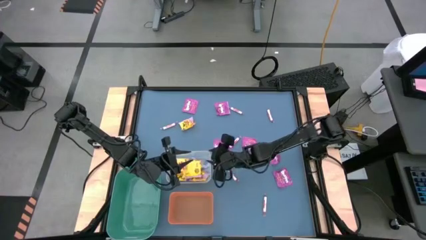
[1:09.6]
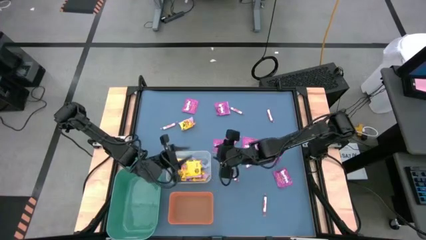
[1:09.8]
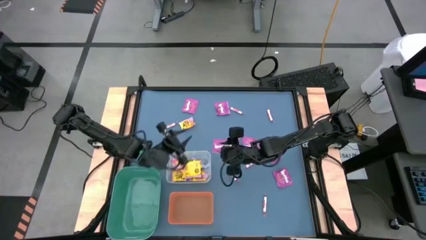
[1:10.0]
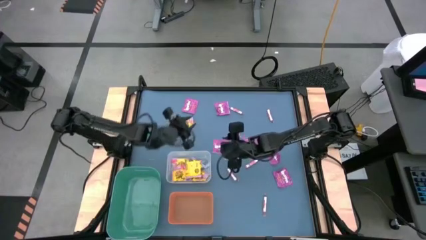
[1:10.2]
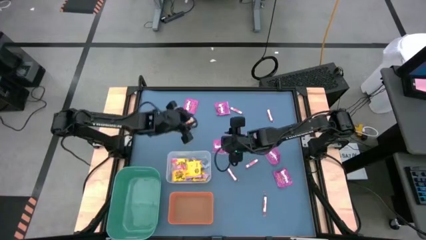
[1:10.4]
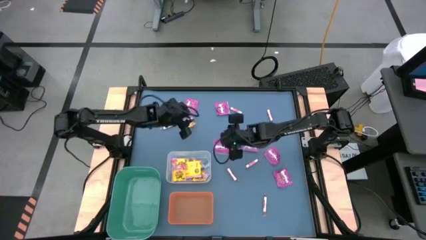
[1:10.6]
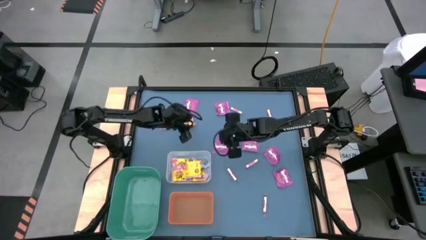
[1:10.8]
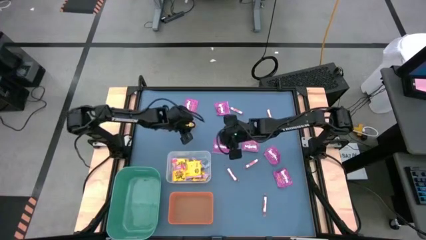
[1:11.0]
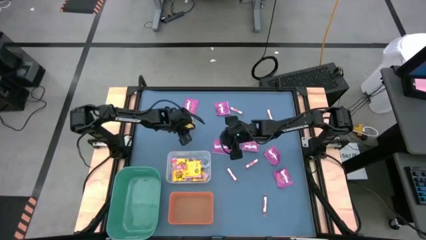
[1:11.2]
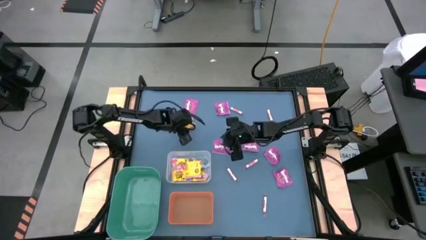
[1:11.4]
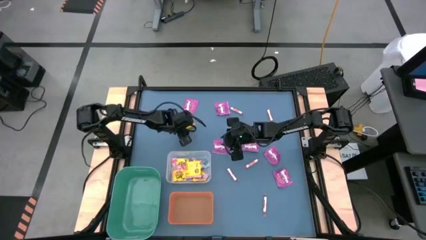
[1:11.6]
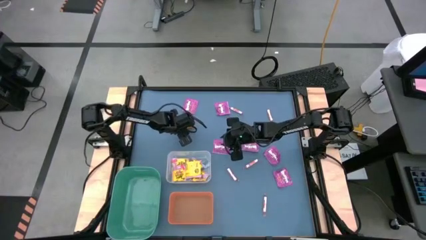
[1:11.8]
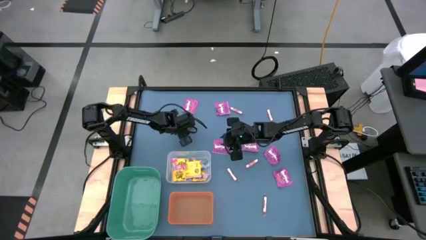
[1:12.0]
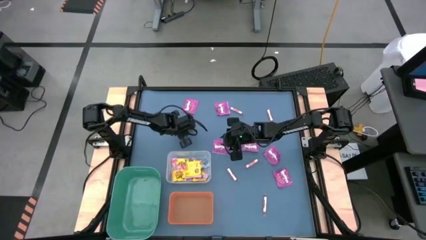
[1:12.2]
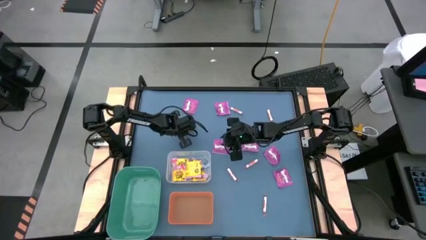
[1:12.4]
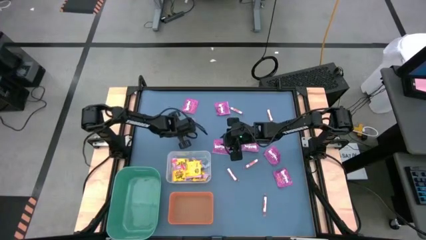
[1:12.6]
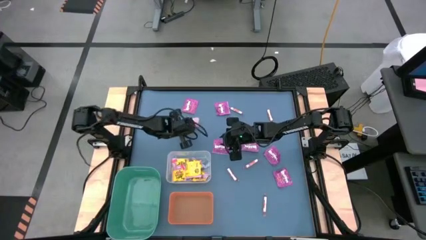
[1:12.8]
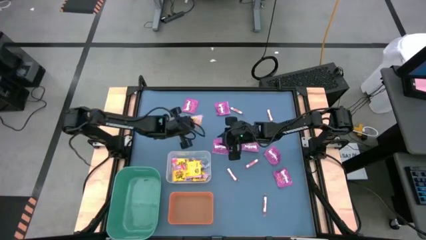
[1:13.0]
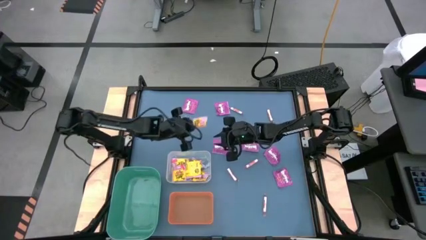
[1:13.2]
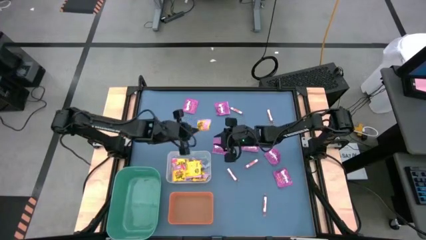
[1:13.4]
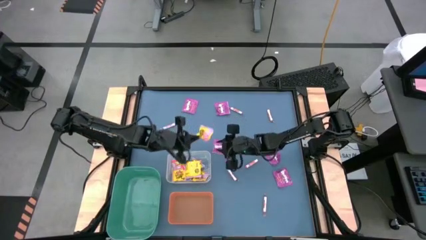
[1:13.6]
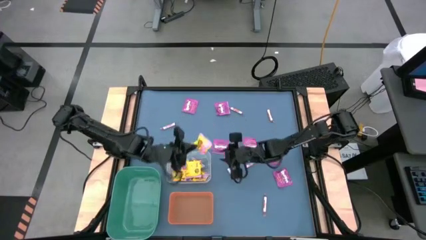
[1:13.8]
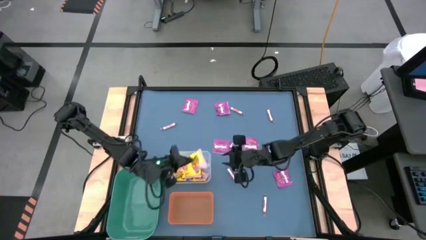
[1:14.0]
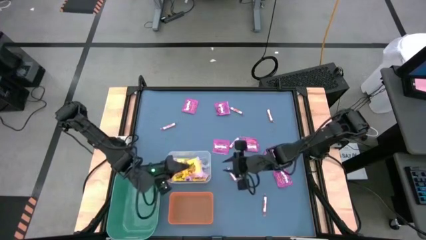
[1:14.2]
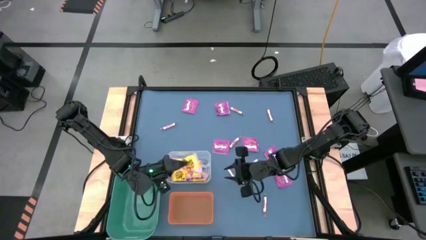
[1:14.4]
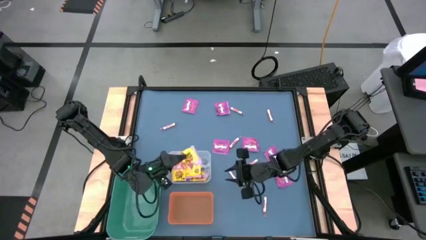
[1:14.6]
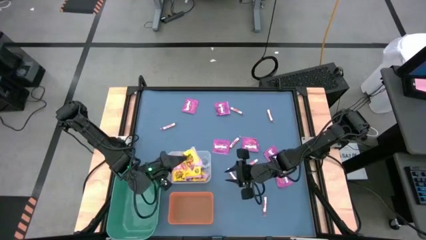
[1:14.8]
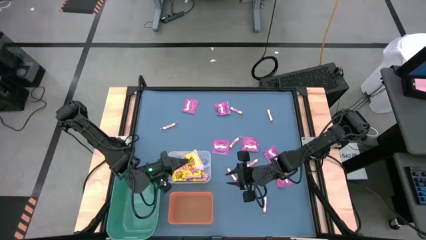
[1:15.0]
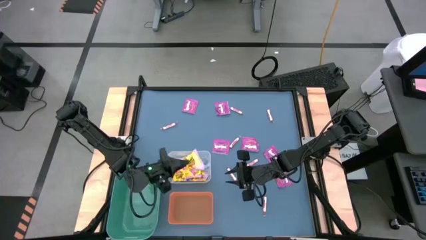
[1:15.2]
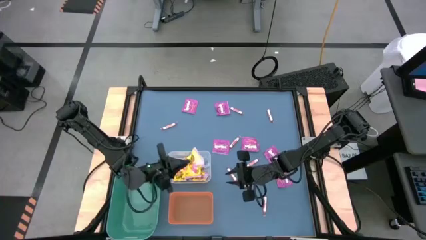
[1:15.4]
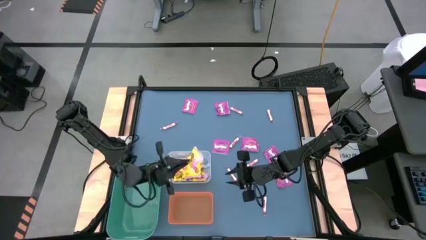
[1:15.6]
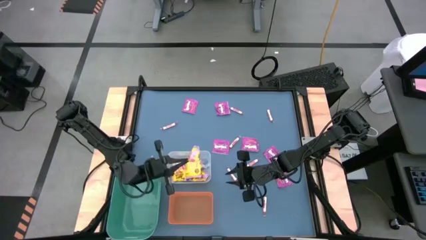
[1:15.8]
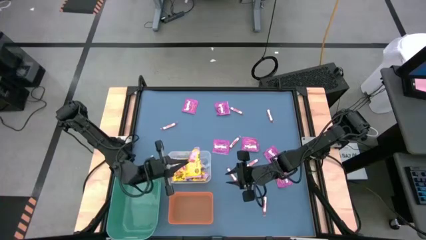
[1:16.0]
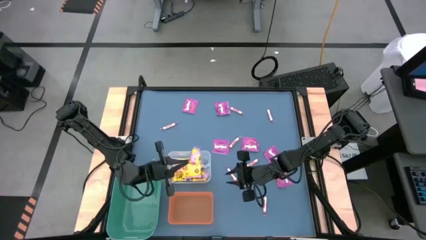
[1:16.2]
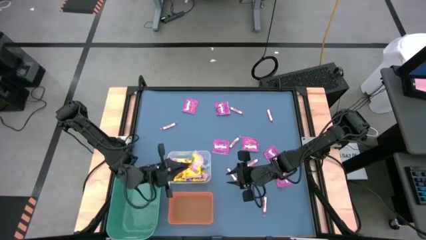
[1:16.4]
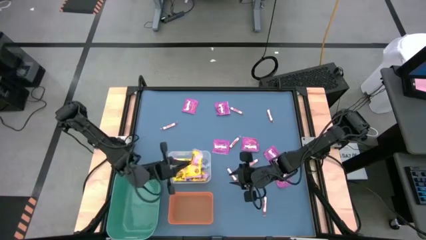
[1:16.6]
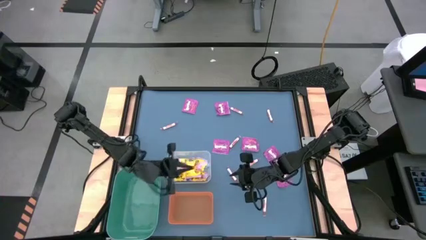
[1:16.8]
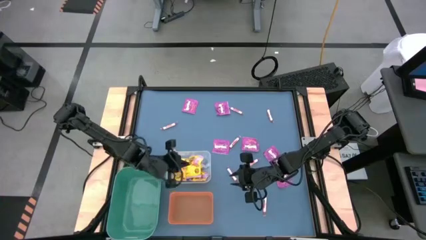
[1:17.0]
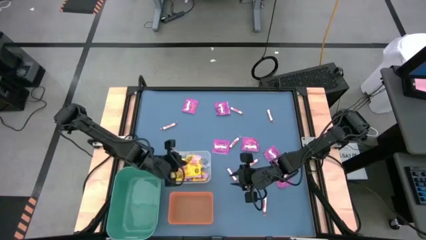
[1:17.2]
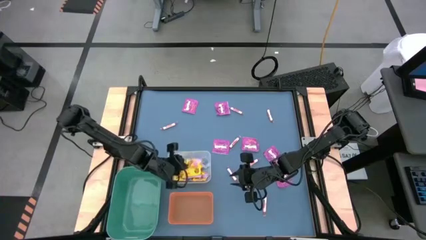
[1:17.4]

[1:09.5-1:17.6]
Task: Sort candy
Put the yellow candy into the transparent bin

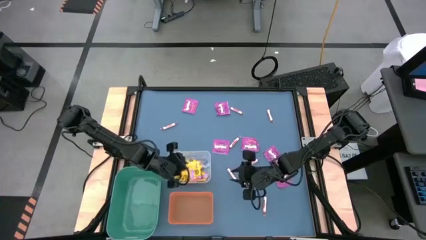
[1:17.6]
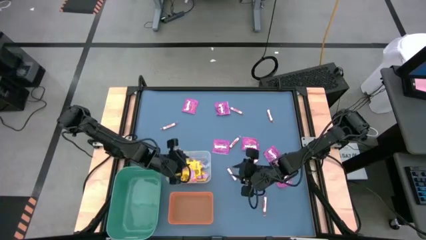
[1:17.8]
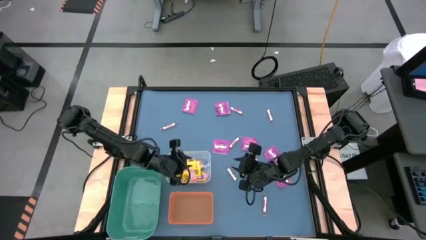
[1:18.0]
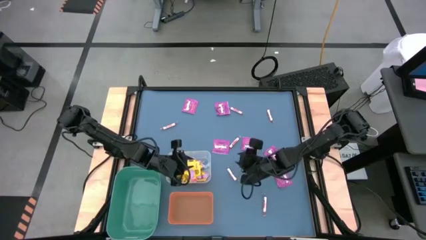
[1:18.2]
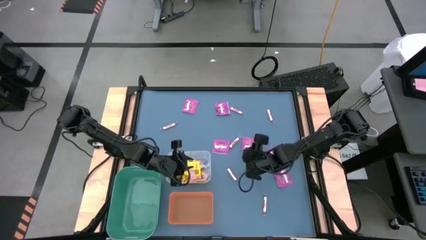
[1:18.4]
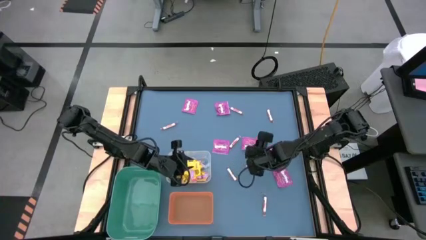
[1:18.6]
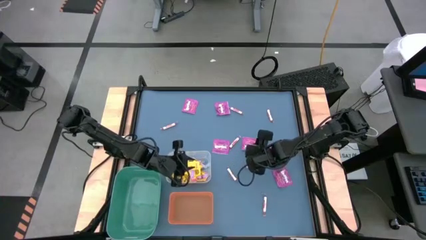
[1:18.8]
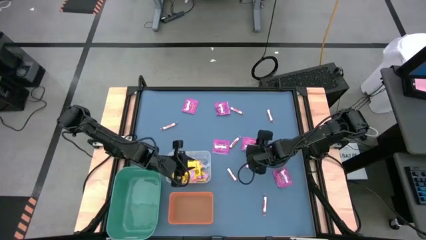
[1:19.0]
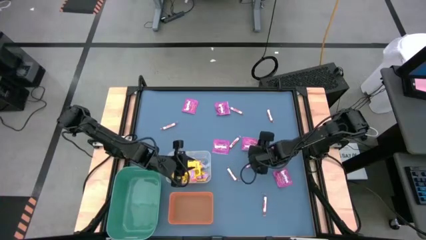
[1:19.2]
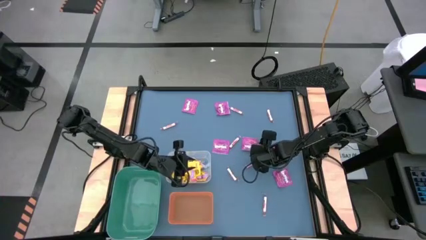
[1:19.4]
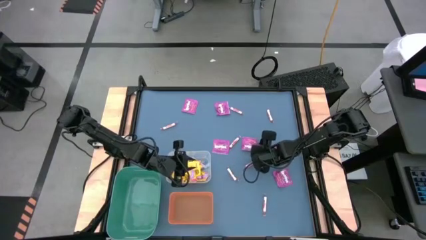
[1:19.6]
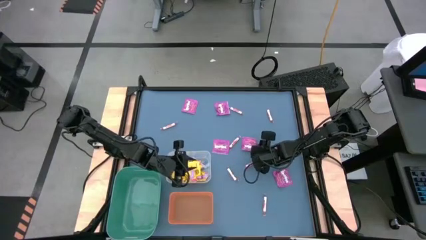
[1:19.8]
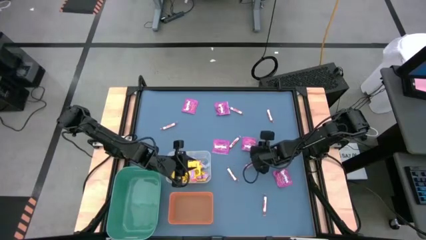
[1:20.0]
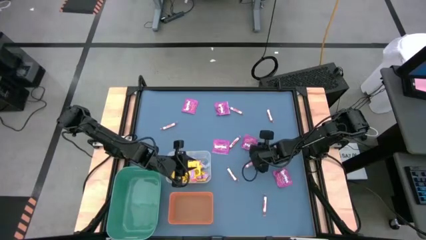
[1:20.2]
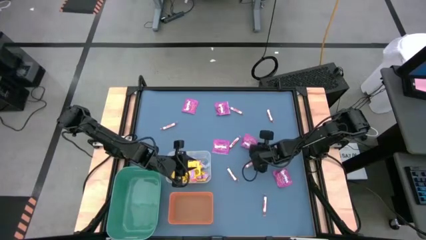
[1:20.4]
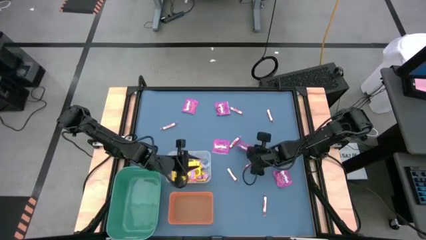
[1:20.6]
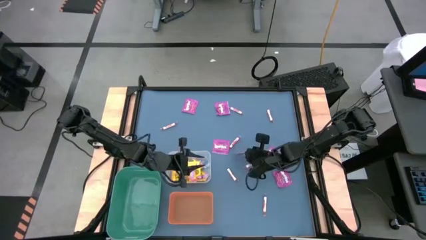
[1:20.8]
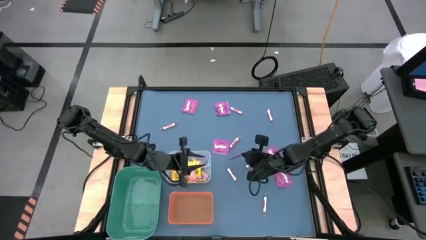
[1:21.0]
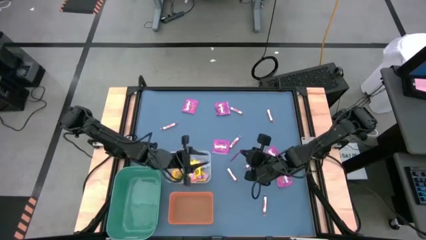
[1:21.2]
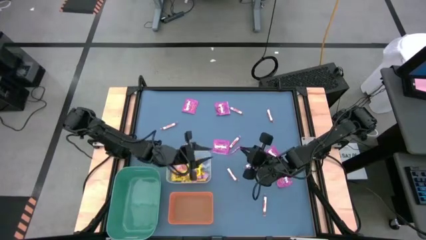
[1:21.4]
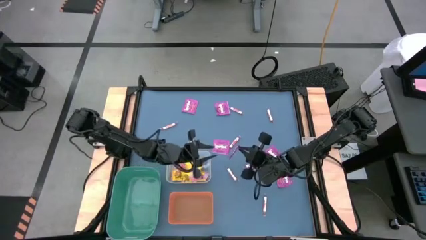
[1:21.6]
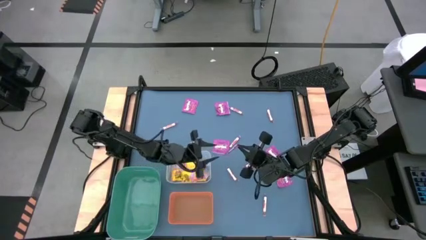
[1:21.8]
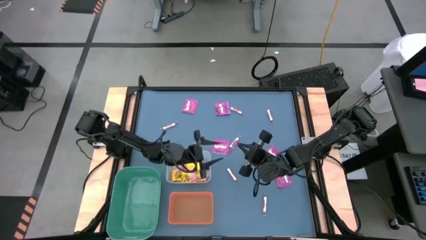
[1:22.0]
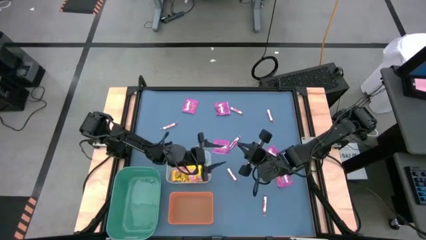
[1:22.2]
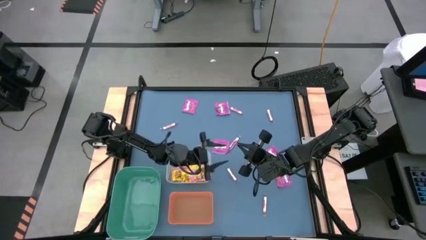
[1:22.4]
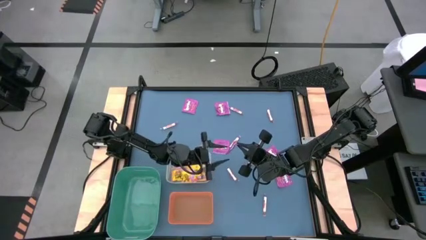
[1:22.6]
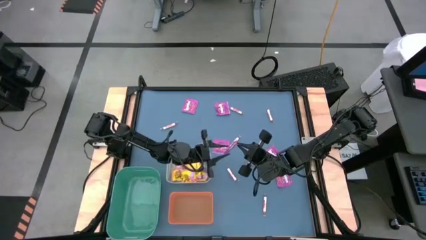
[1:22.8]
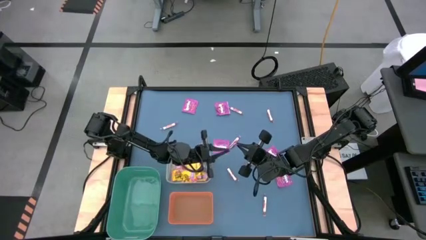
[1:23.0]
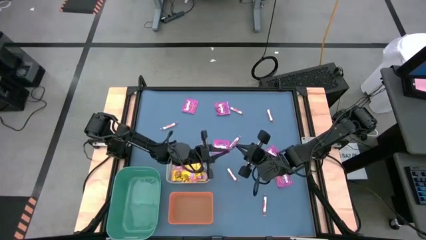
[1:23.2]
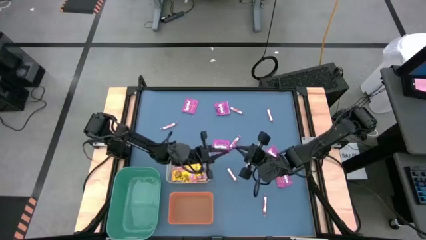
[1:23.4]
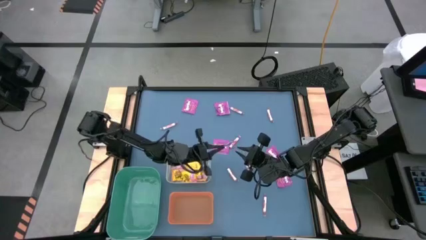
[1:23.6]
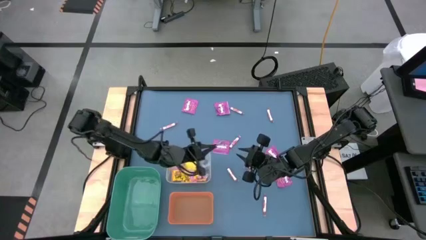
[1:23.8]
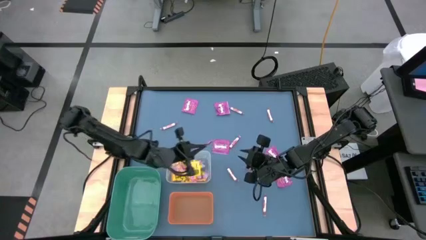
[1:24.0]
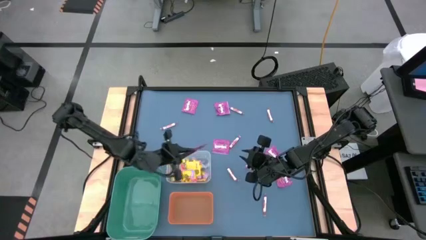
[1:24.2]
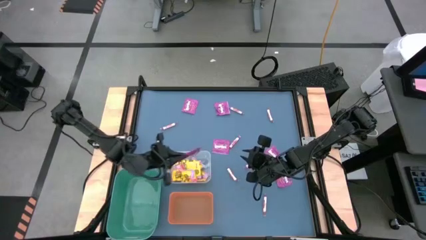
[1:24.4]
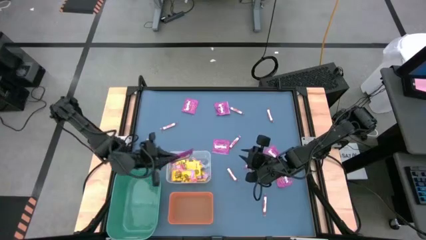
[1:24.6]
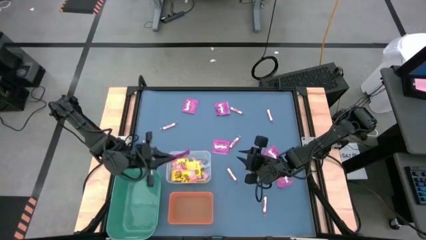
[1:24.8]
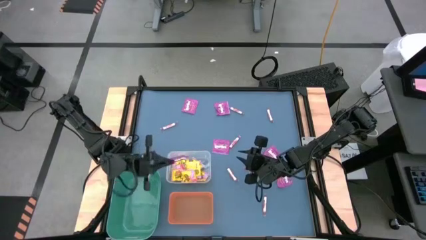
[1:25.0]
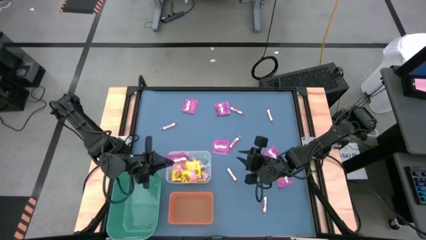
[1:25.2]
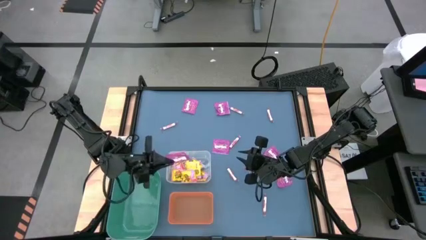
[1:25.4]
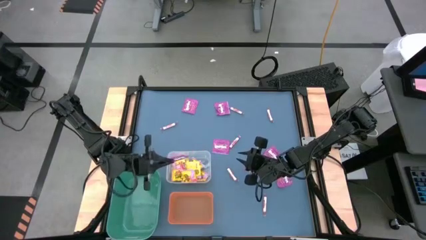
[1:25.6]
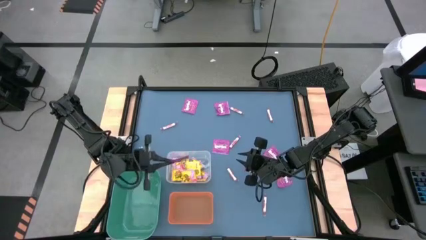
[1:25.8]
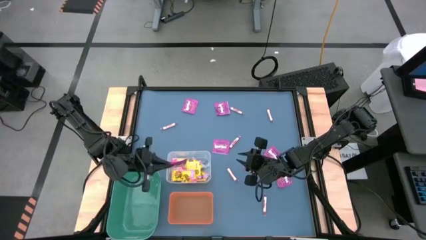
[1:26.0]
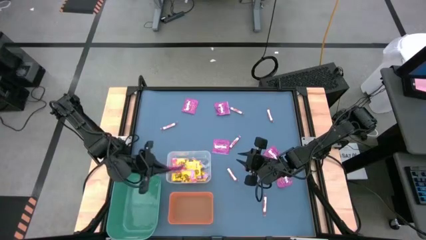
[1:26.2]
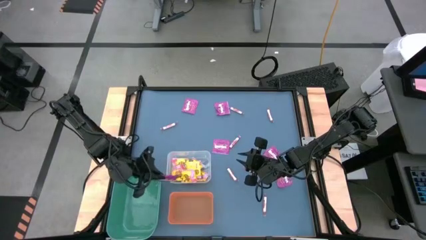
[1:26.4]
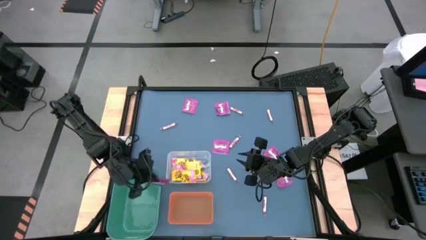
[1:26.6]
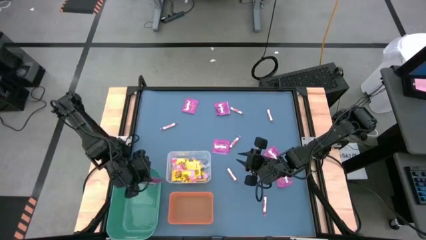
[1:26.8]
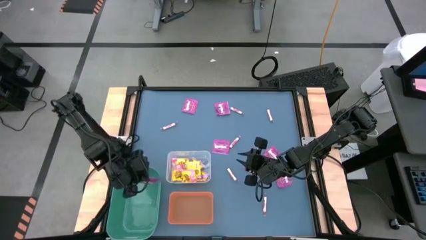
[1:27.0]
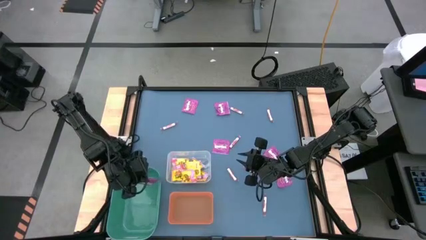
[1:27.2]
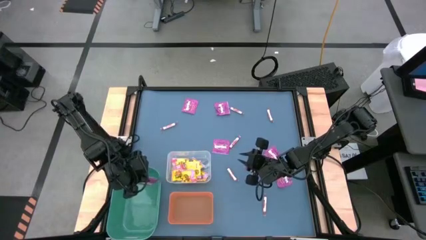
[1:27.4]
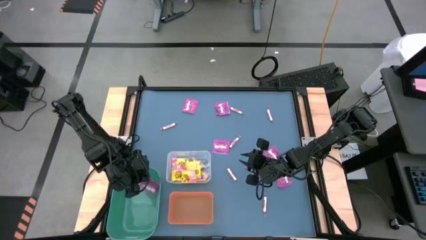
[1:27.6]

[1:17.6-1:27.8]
Put the purple candy pack into the green bin
